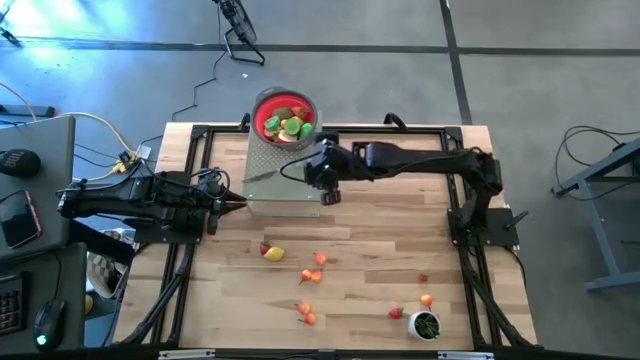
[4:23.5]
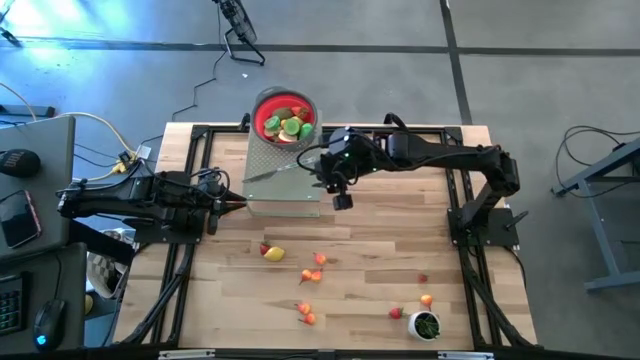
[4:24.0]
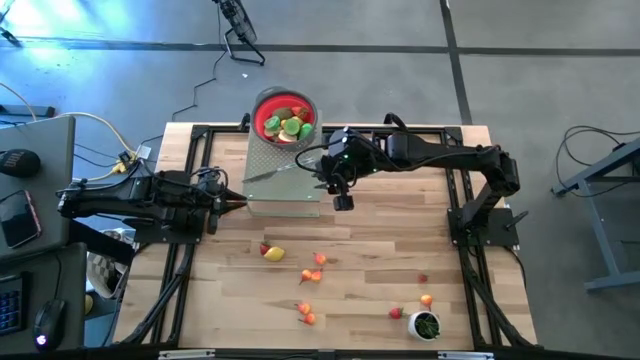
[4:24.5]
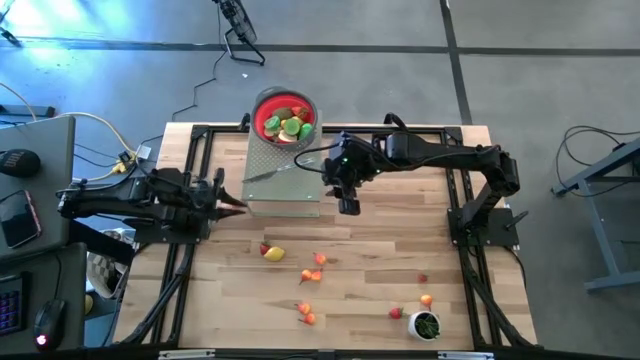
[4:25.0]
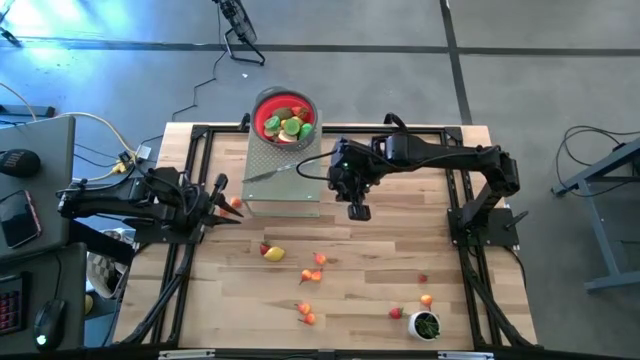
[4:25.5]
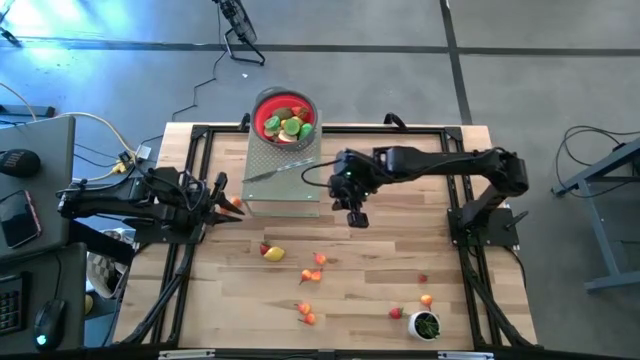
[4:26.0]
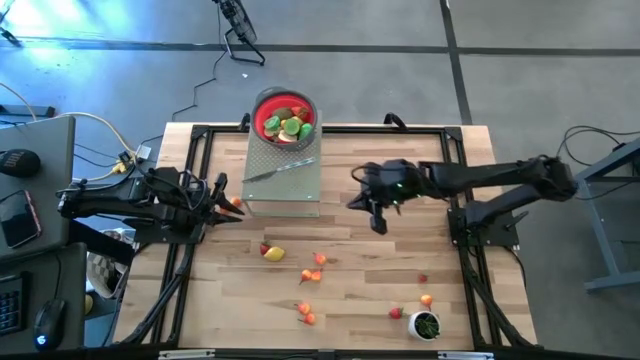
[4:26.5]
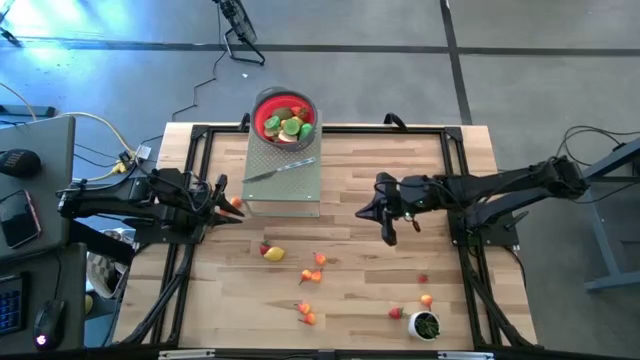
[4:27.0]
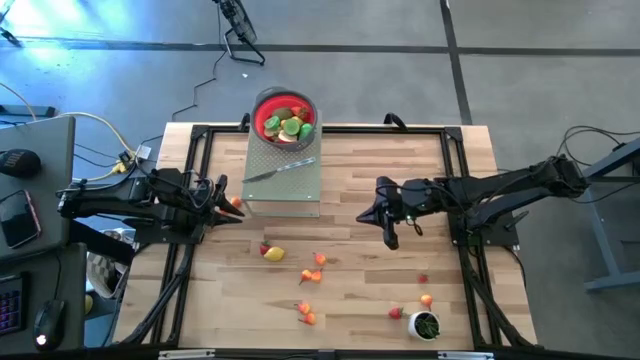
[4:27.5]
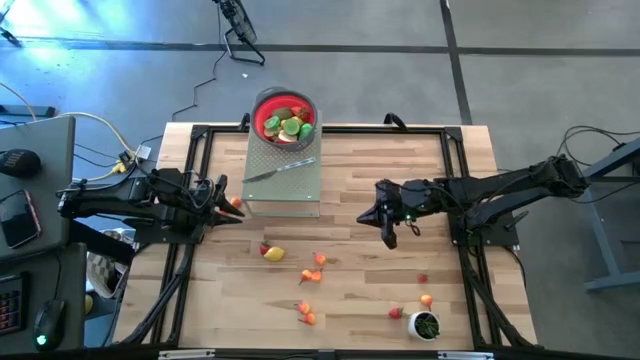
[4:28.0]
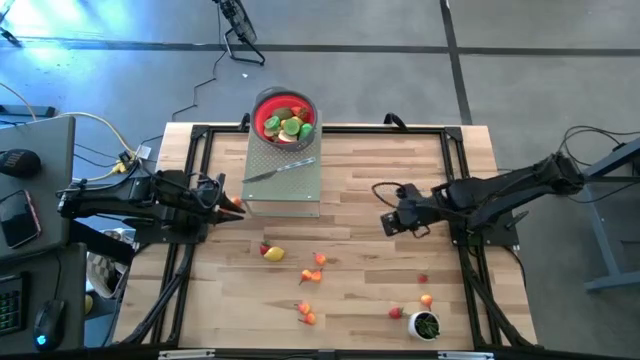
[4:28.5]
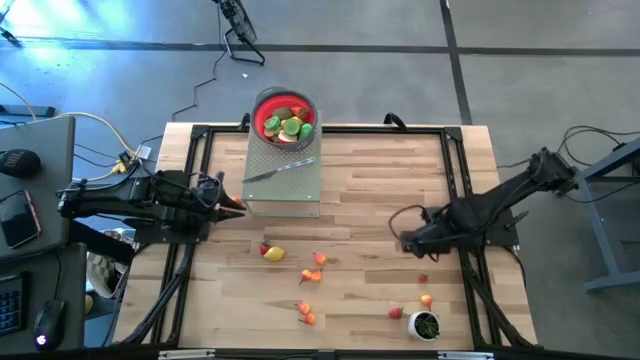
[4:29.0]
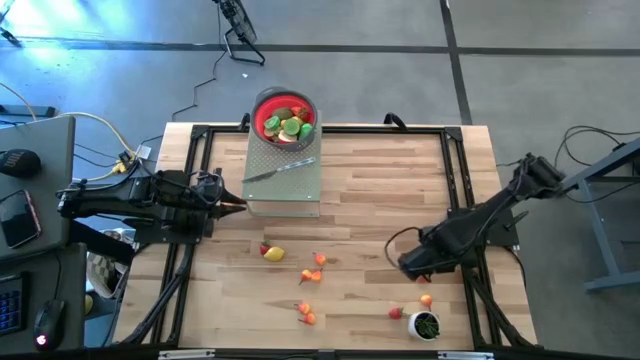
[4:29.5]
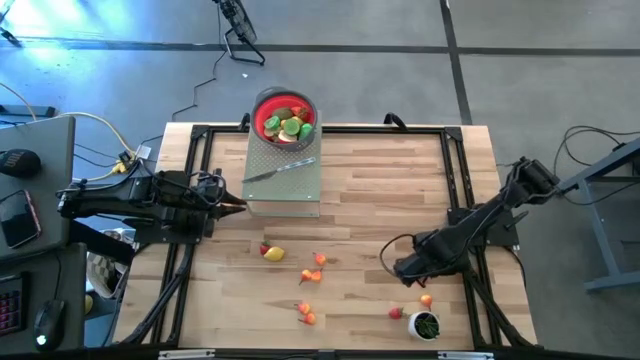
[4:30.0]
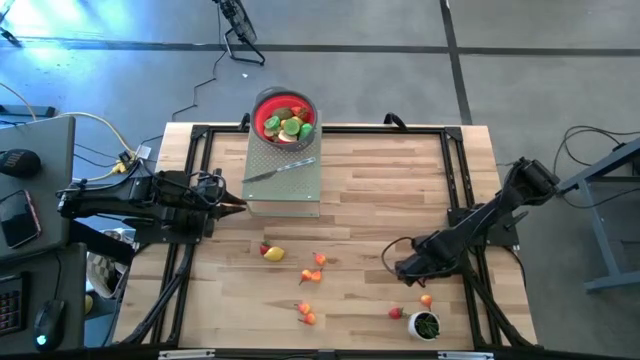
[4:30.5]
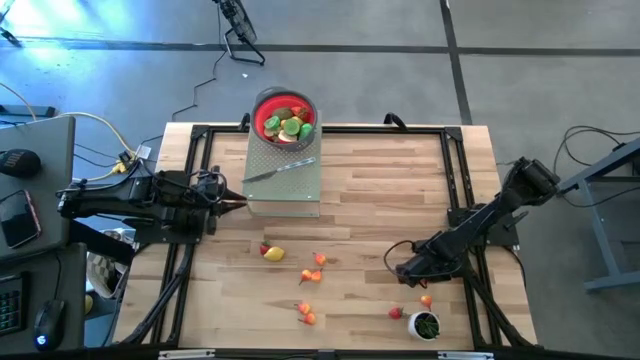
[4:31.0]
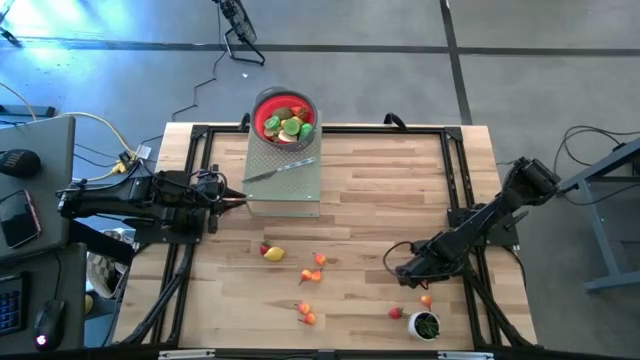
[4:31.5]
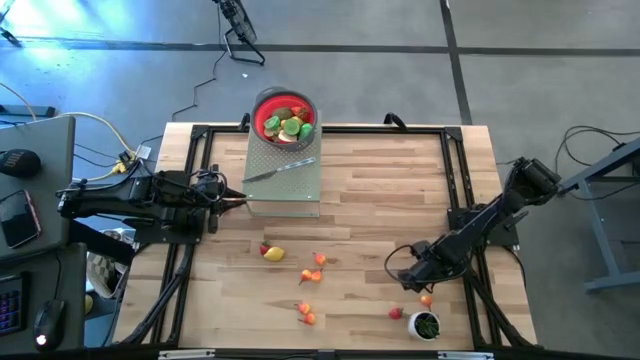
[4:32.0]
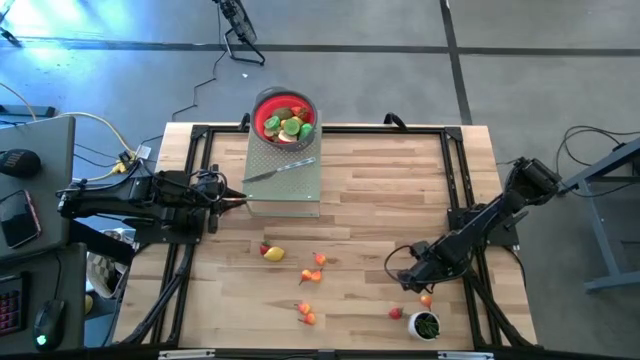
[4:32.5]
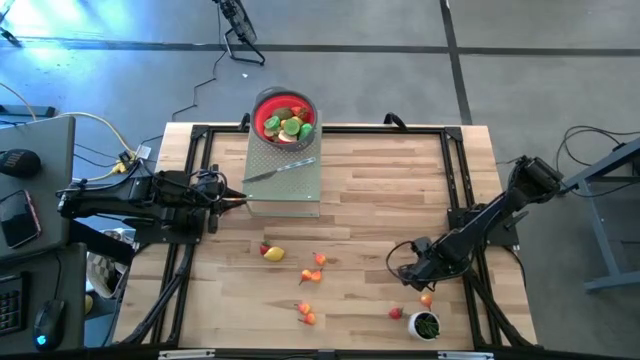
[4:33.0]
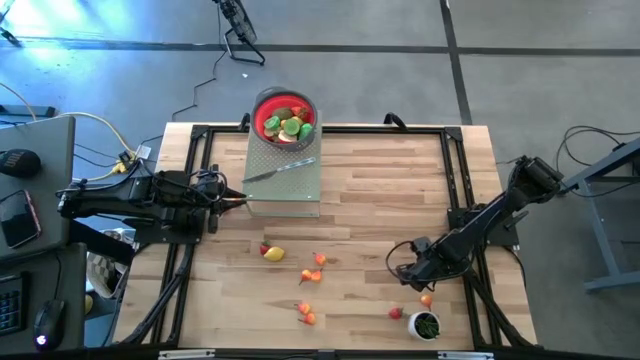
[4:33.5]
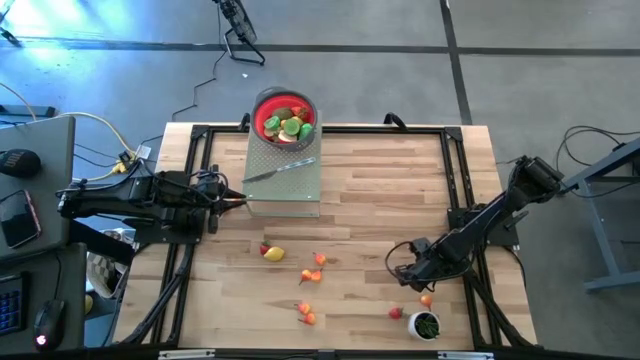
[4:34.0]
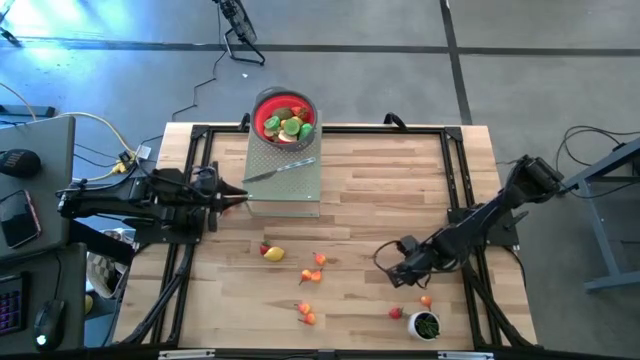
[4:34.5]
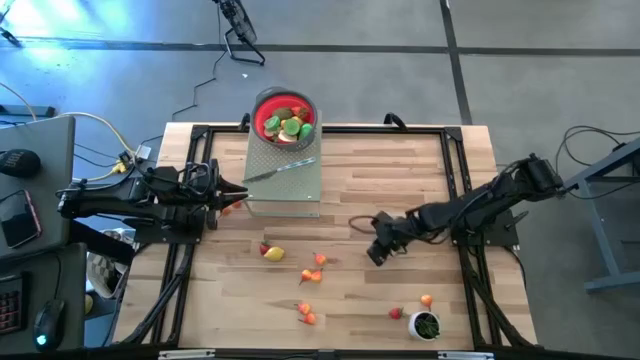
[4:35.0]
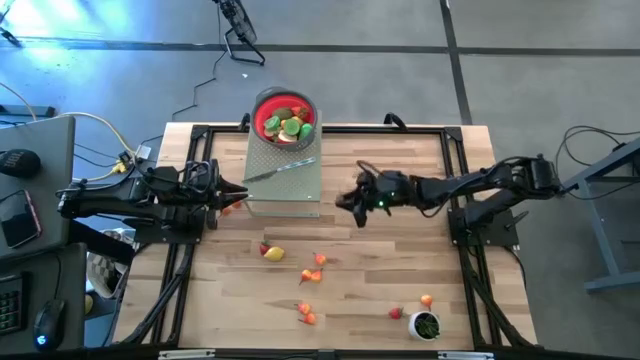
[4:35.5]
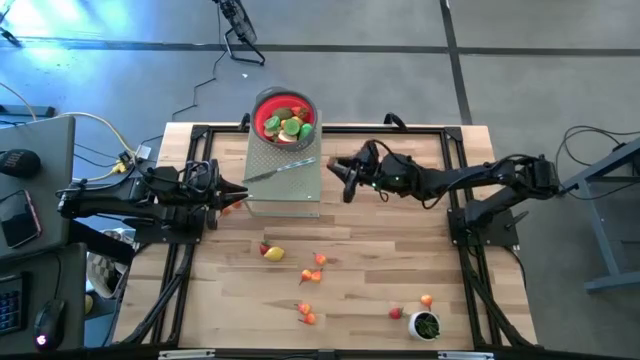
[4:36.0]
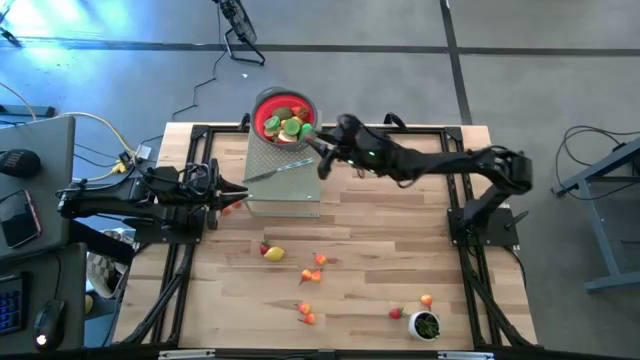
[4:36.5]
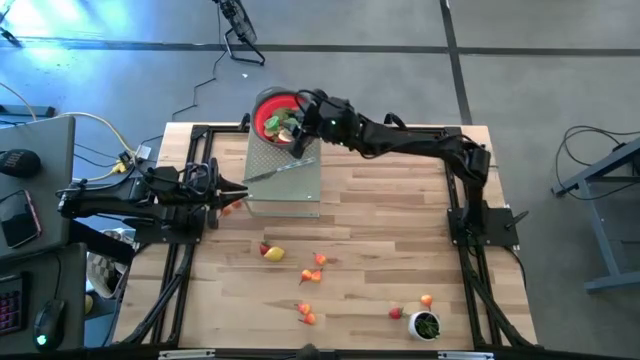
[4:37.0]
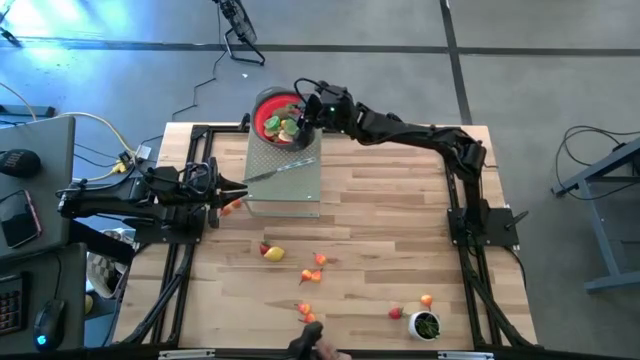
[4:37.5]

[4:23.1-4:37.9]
Task: Pick & Place Fruit
Put the strawberry into the red strainer on the shelf

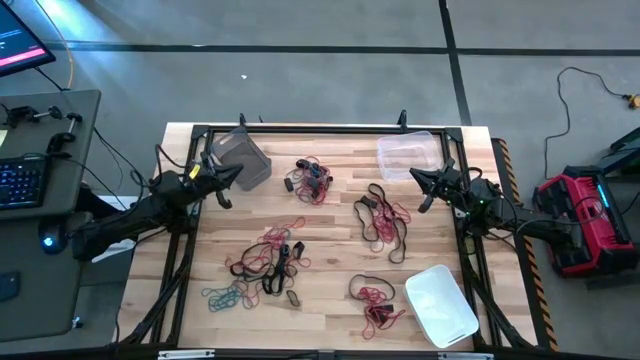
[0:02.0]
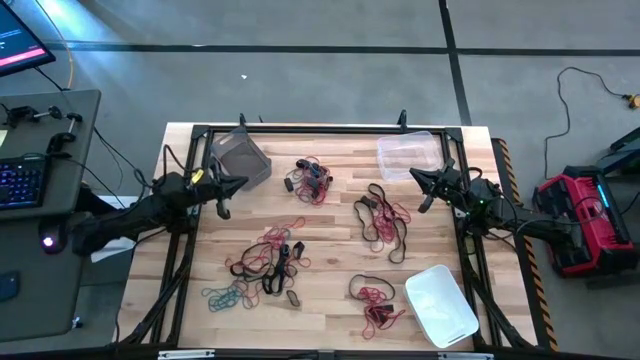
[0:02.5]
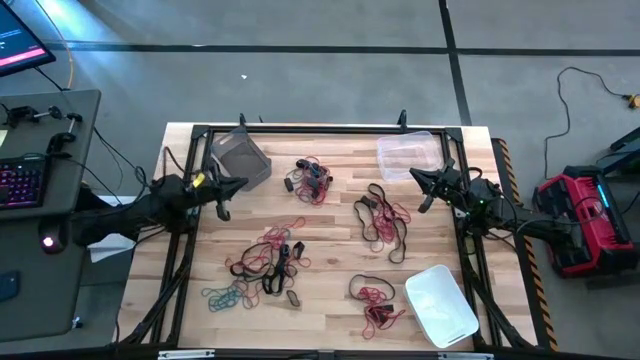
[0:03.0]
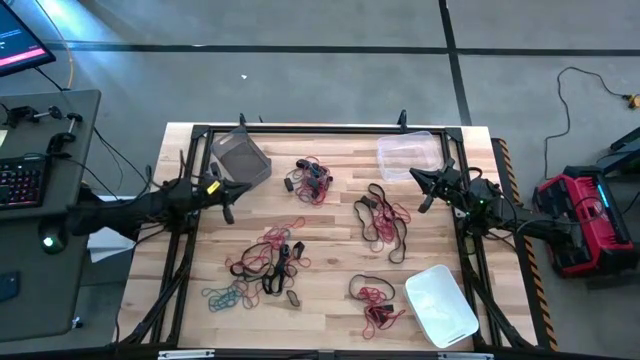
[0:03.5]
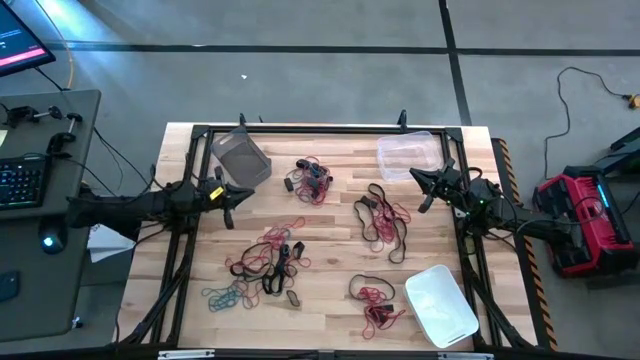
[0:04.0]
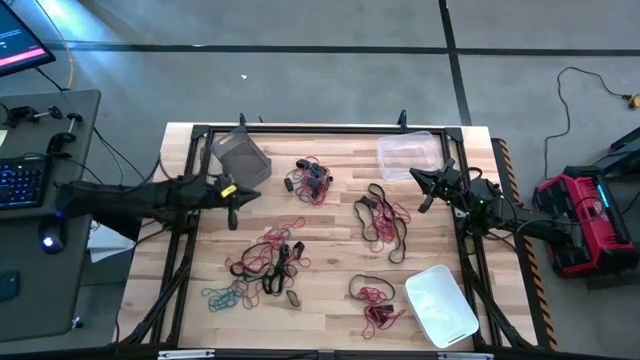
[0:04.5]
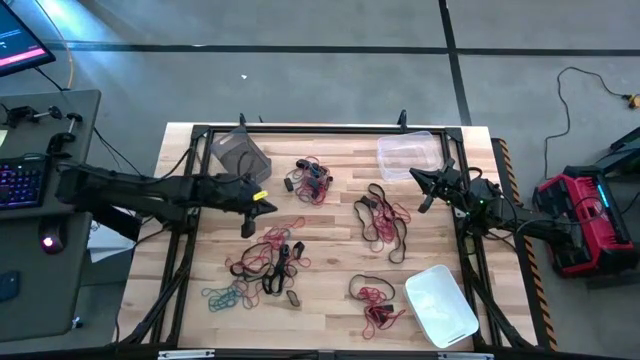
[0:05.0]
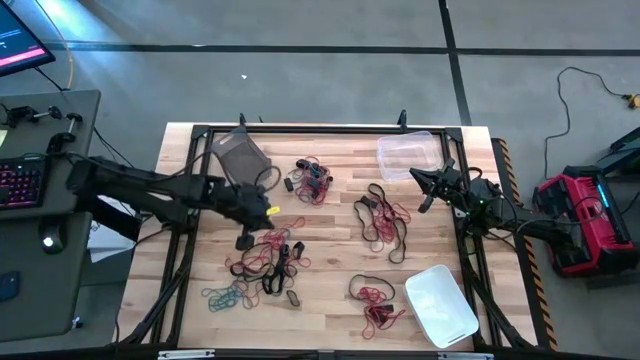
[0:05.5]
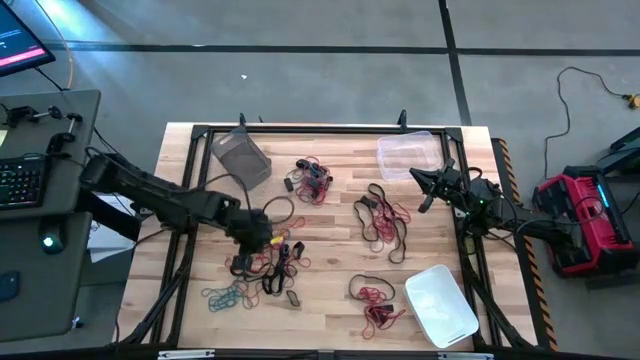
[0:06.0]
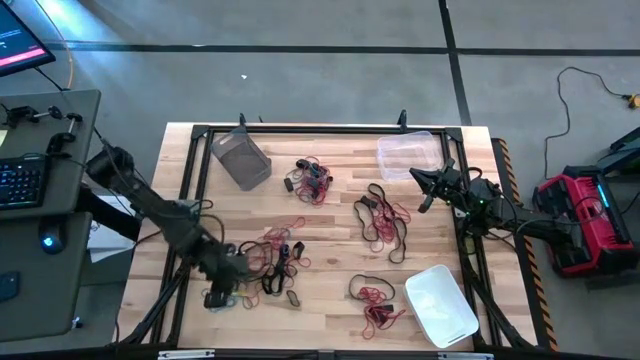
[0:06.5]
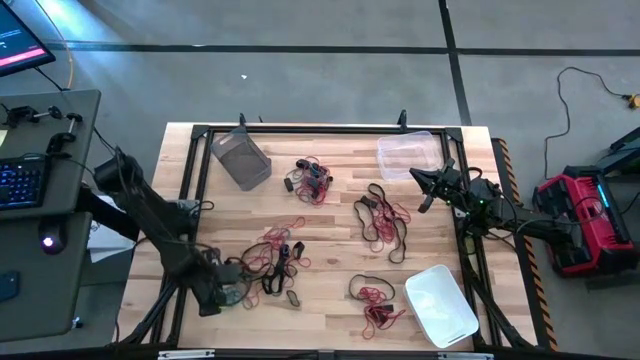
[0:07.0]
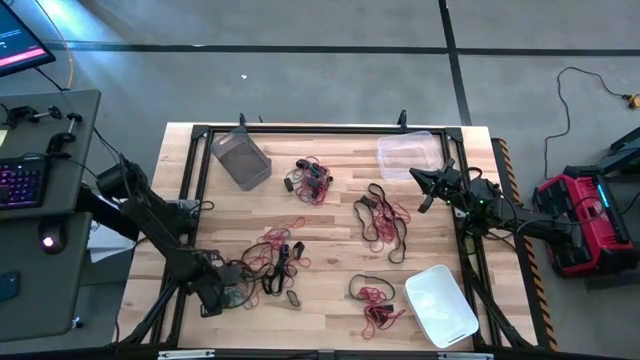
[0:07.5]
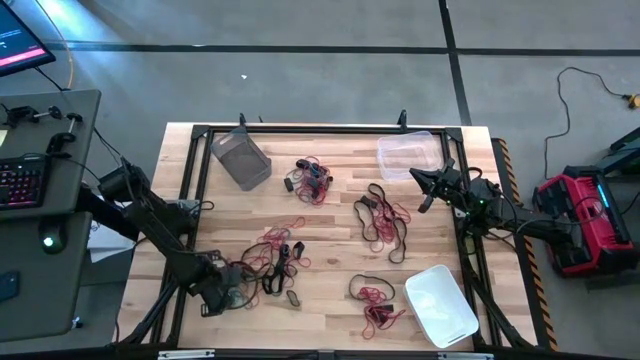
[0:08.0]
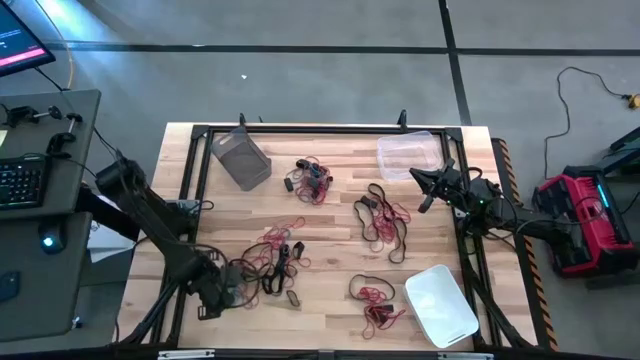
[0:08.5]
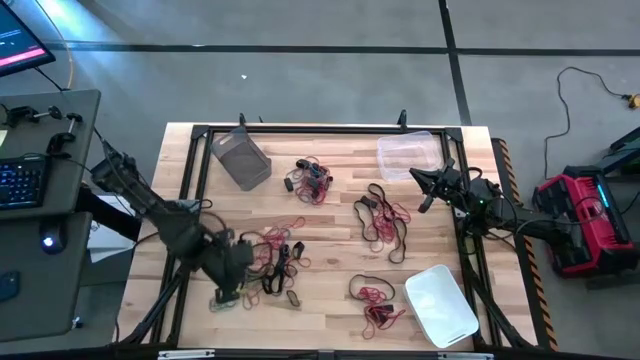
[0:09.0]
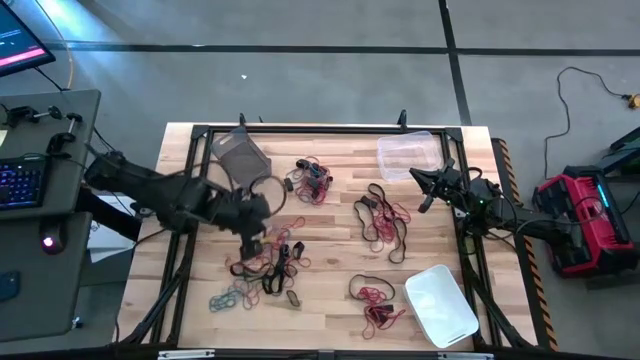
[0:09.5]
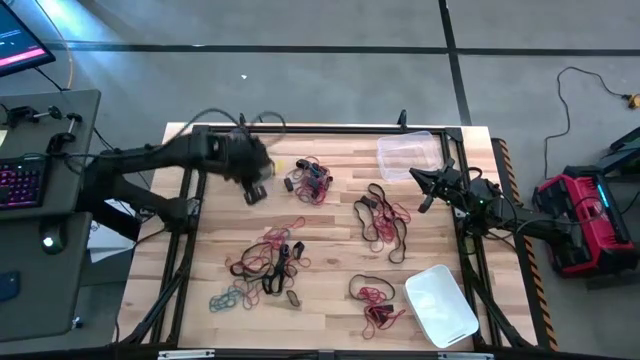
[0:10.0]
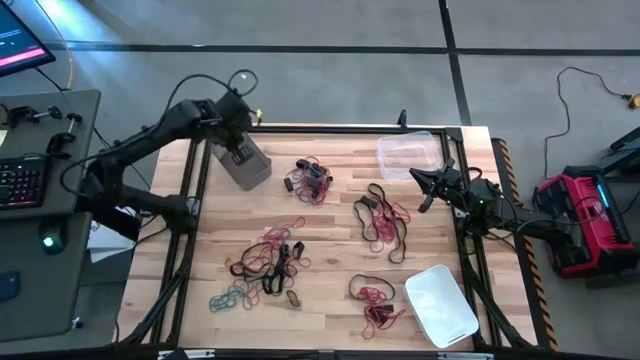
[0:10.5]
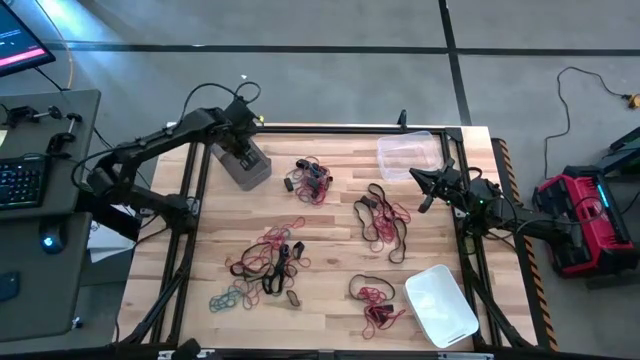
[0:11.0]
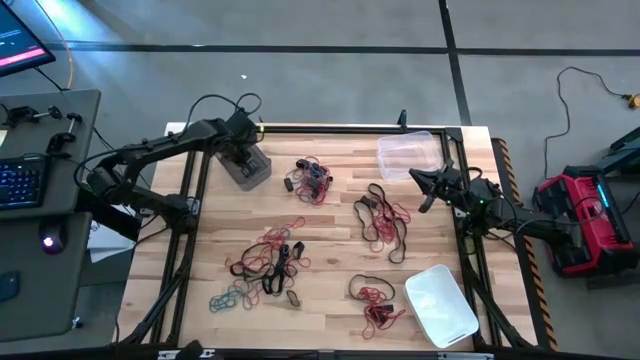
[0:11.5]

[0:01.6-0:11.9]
Task: Sort rubber bands into baskets
Put the blue rubber band into the black bin
